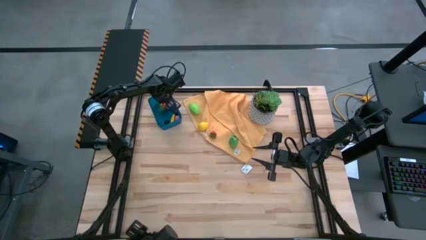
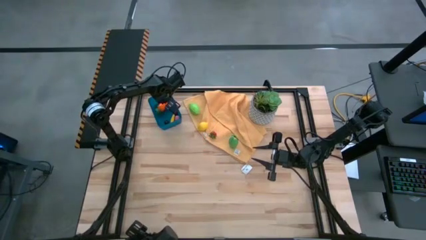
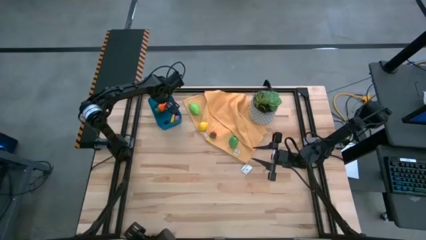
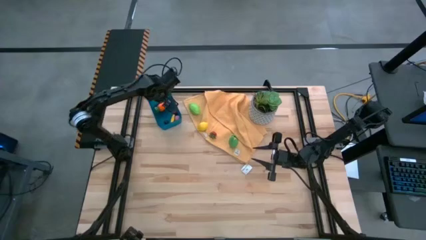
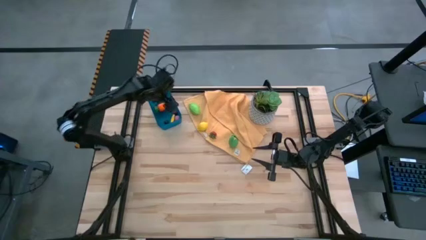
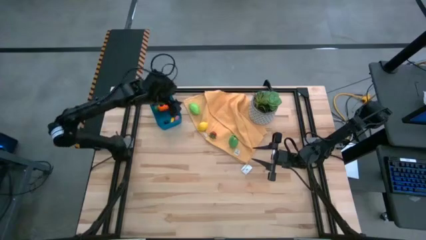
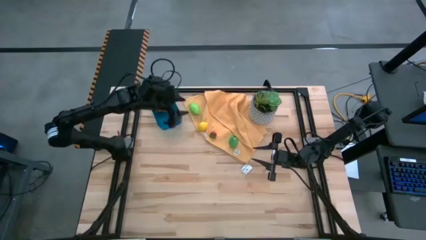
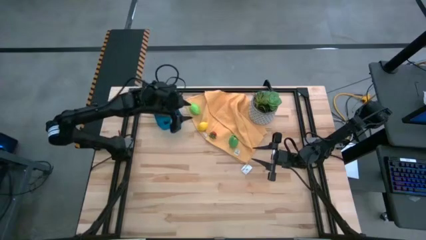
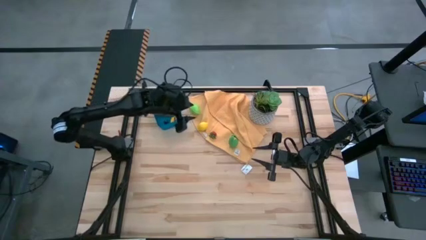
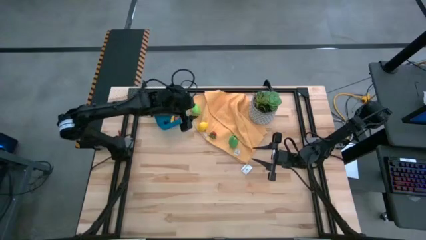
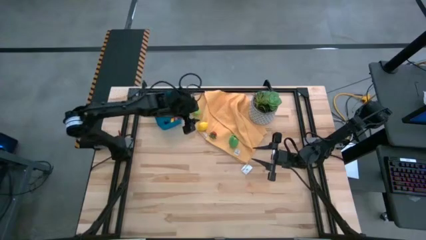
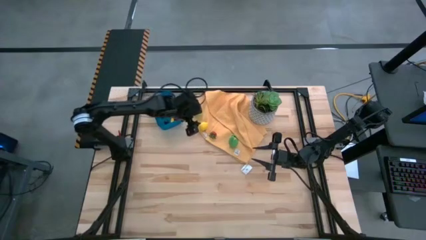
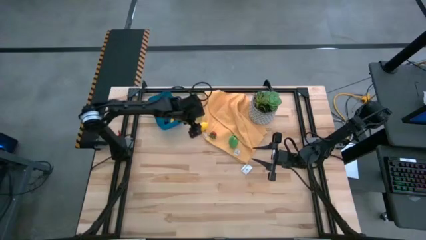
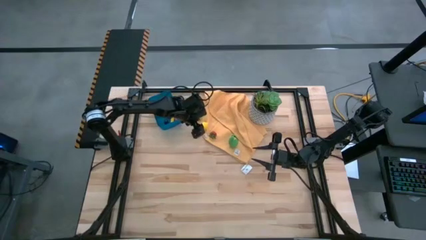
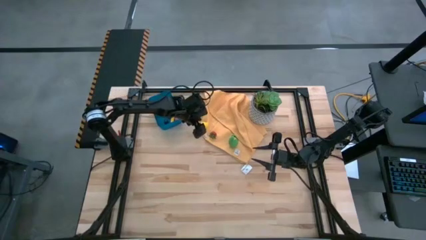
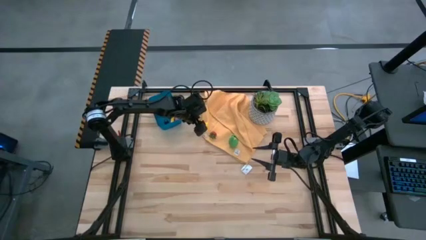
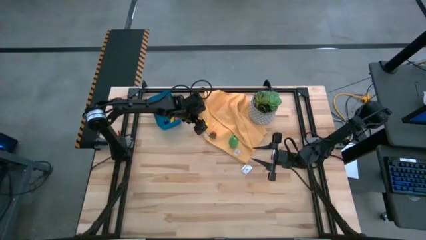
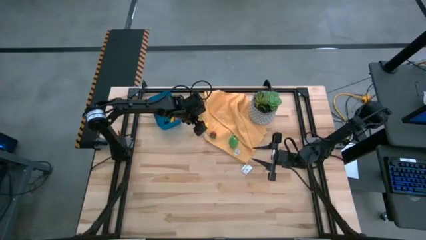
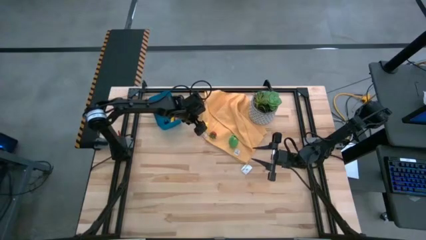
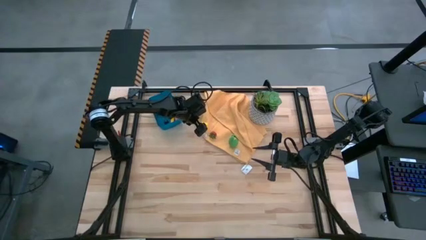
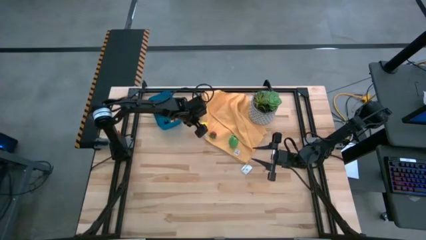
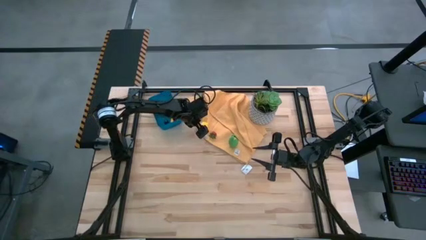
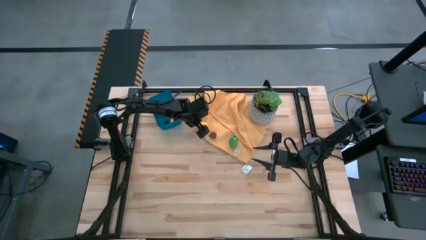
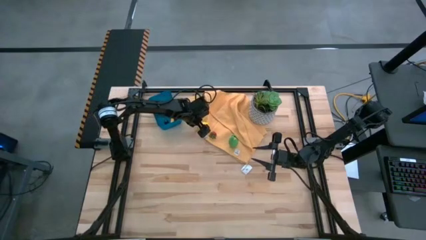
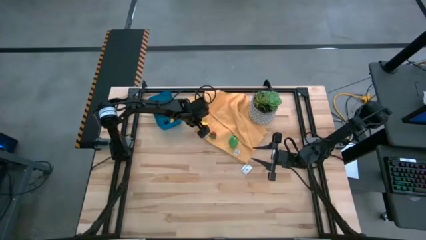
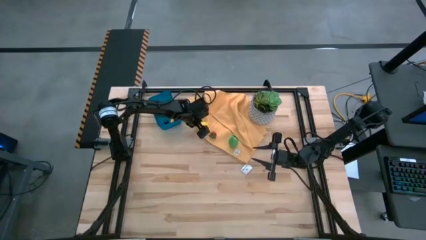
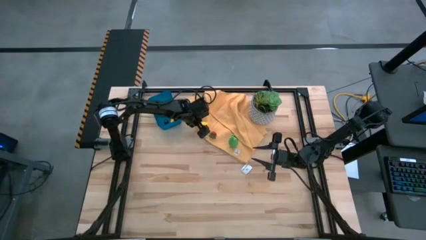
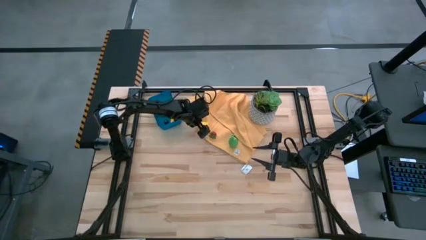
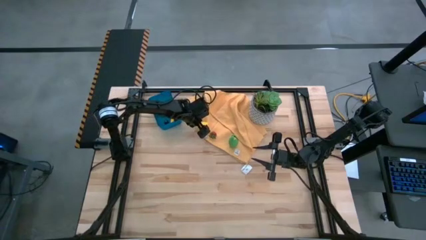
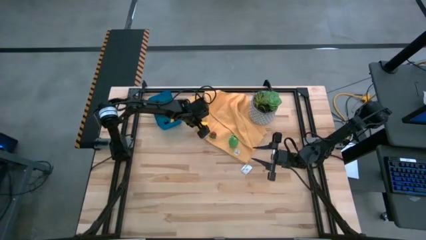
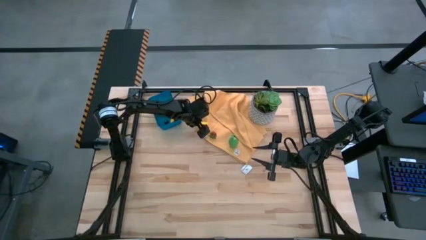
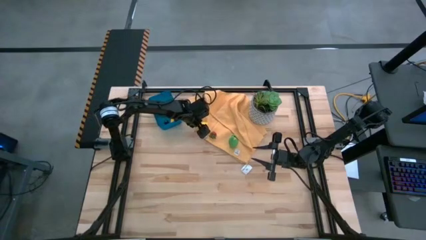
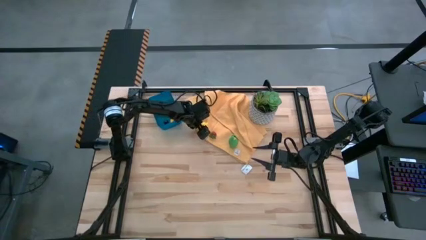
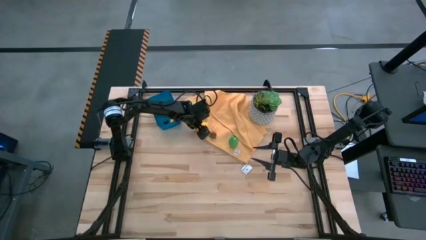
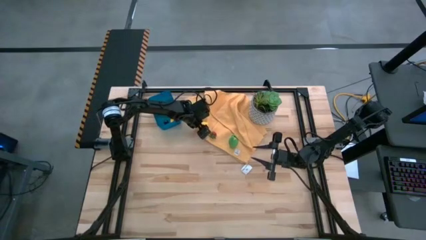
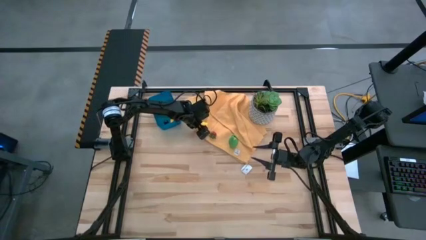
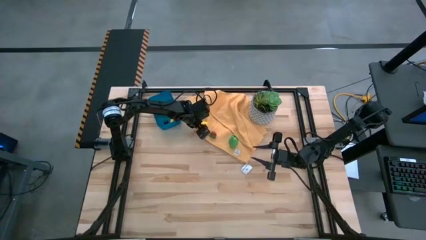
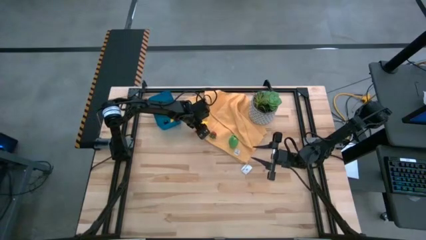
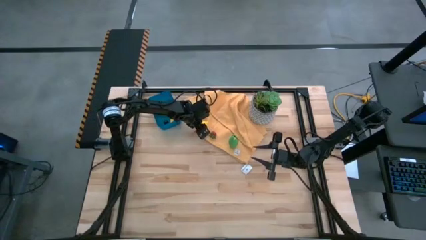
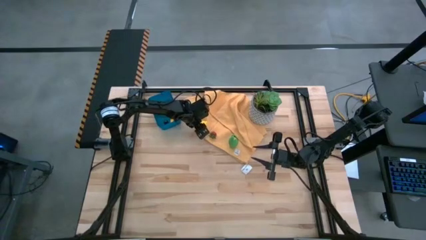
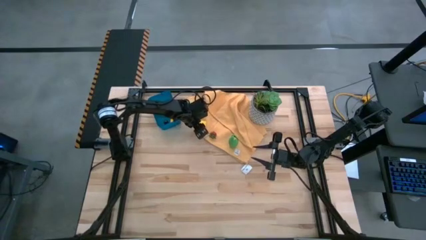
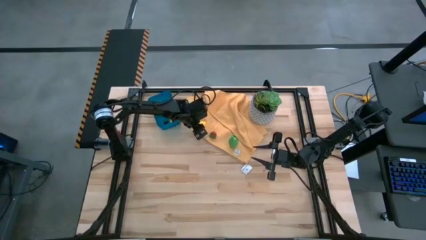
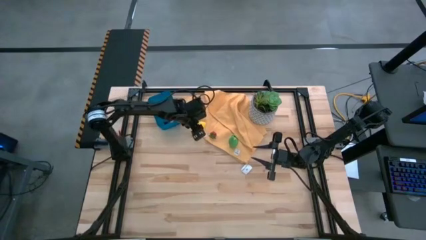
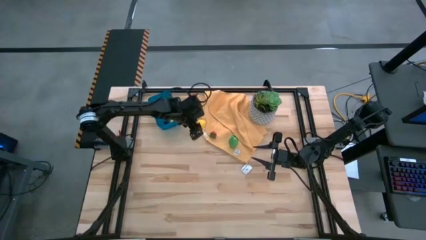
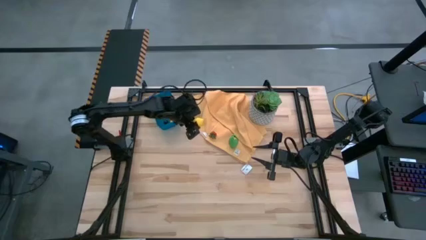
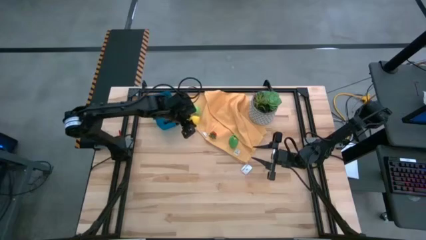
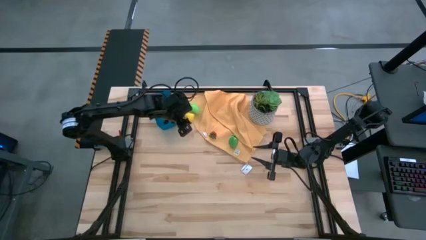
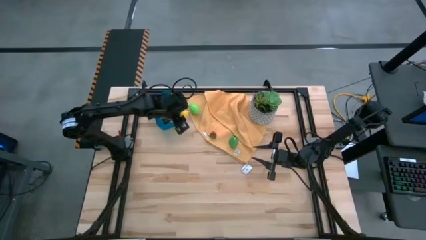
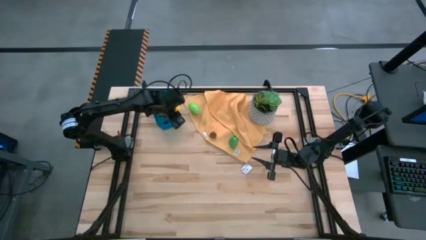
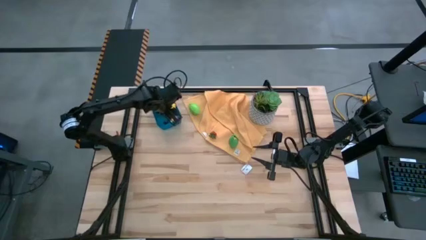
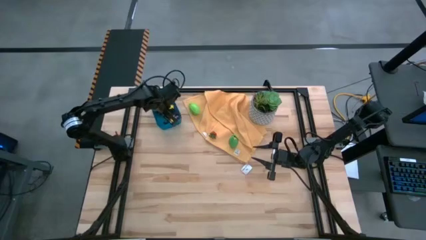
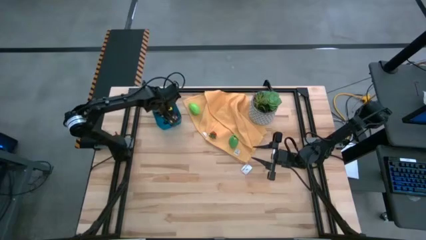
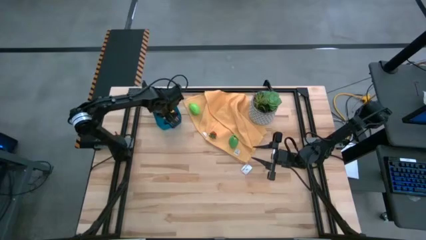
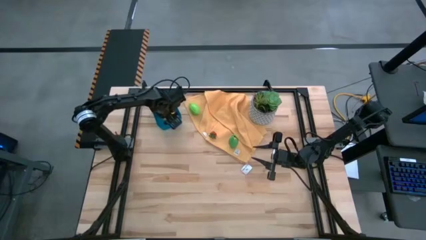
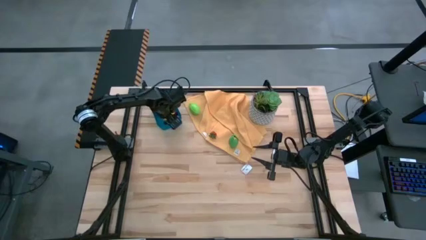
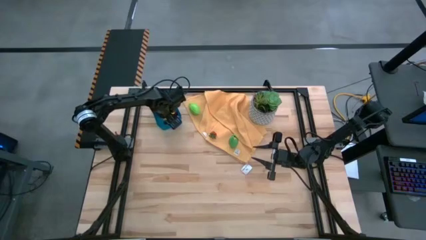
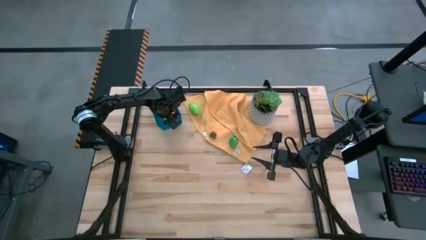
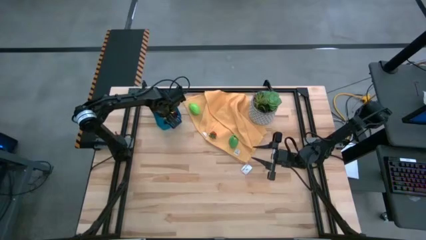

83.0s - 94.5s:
Task: Pick and placing Produce into tupperware
Put the lemon into the blue bin

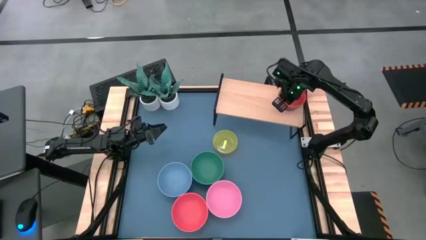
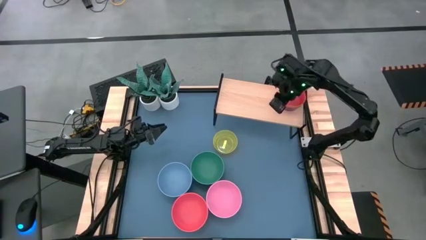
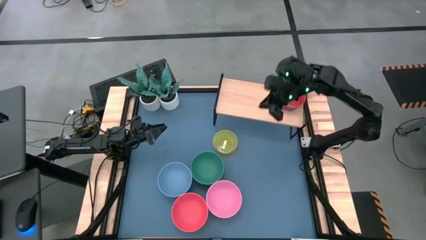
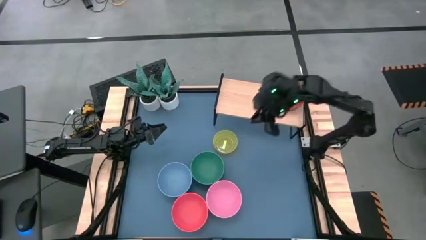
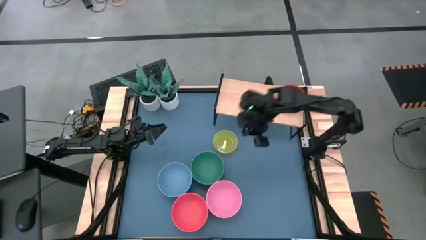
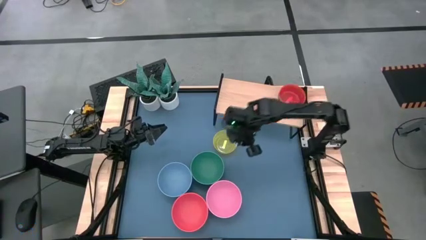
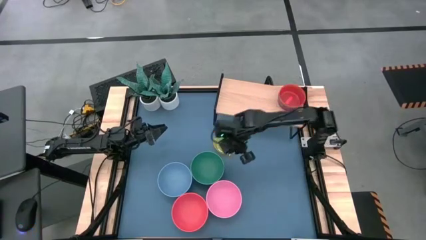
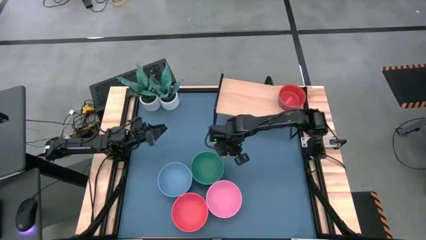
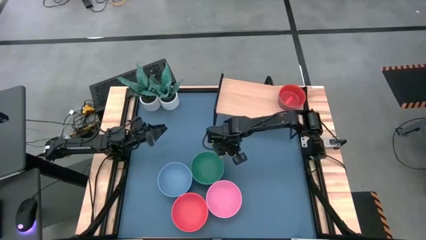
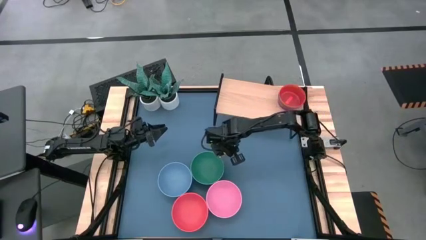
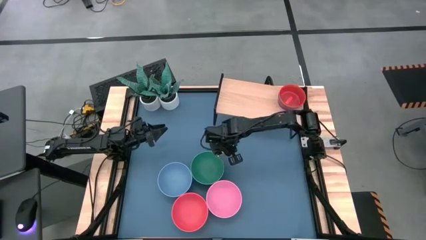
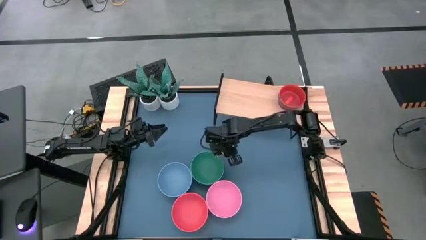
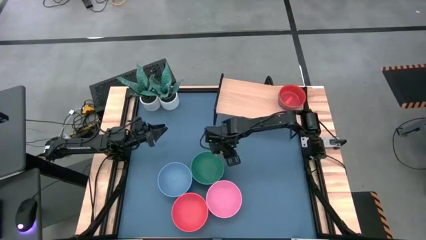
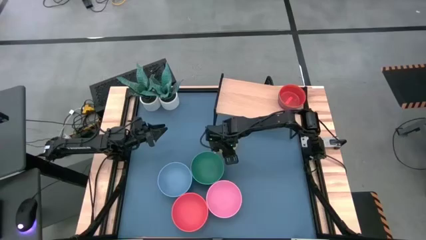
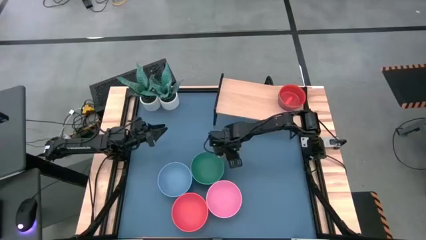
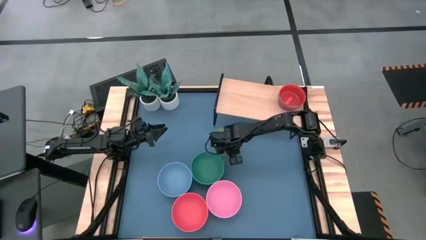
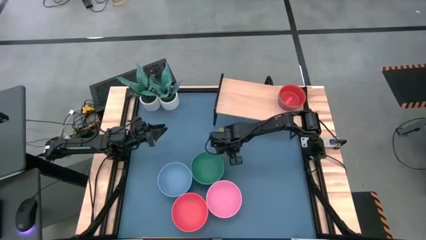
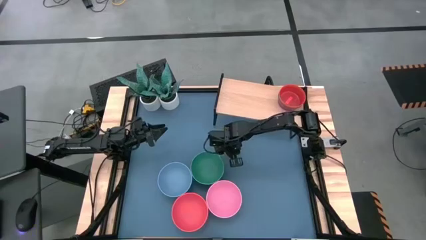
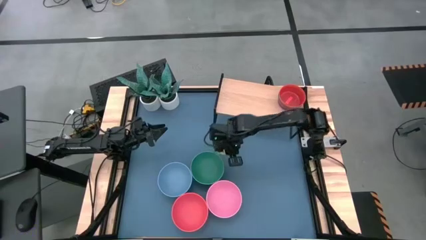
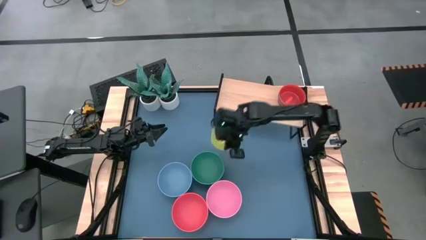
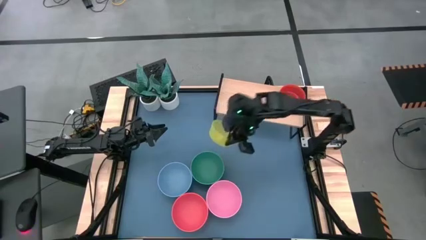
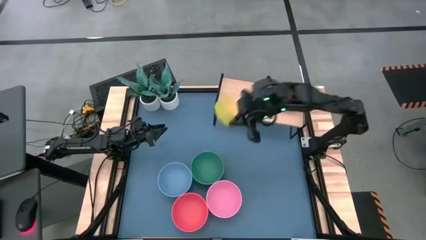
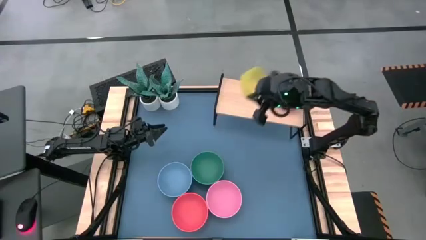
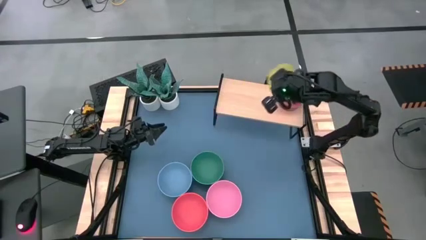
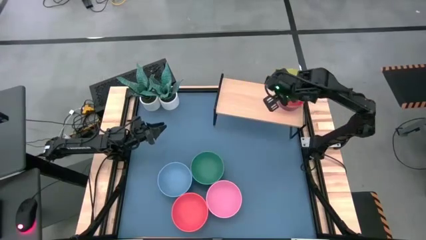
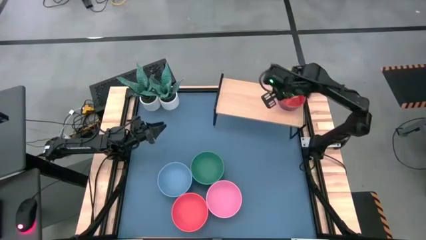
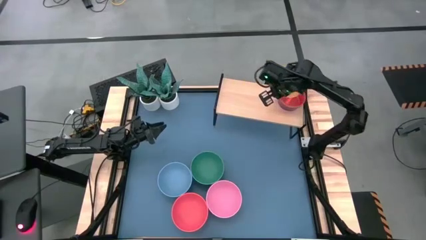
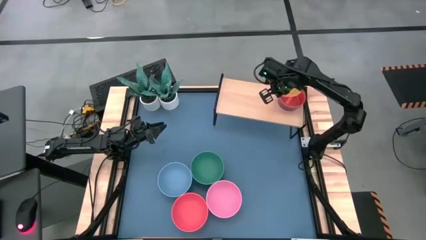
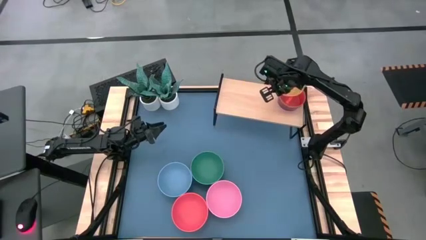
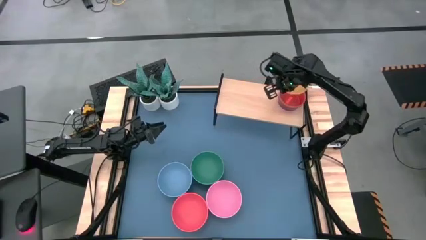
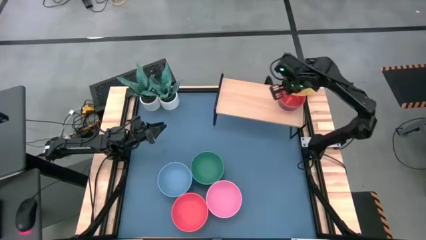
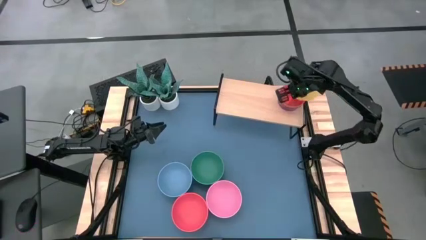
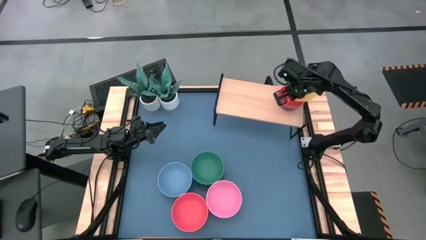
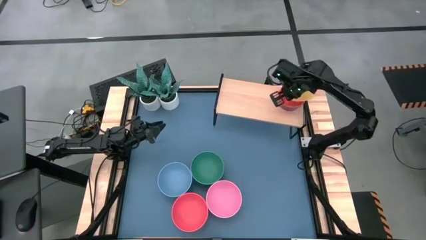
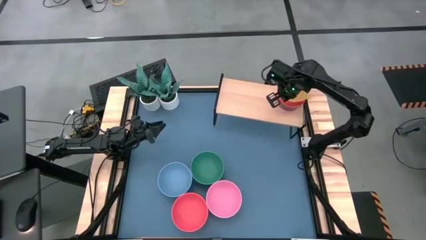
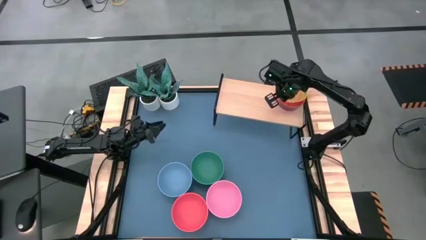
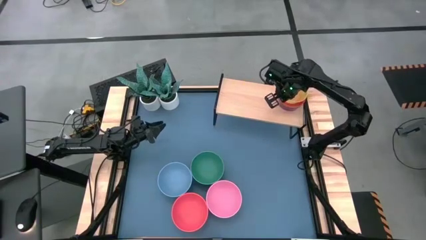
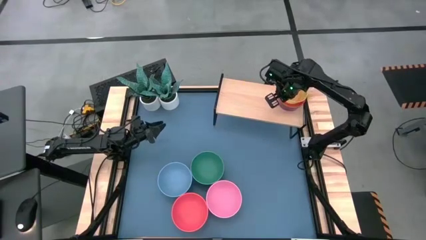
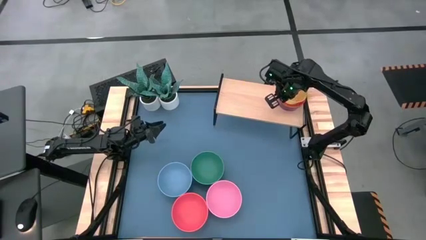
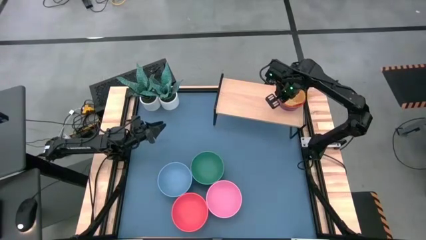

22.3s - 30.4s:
Task: Place and stack bowls onto a shelf
Stack the small yellow bowl on top of the small orange bowl on the shelf
